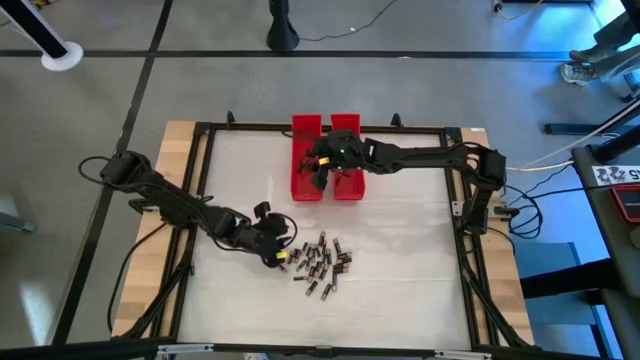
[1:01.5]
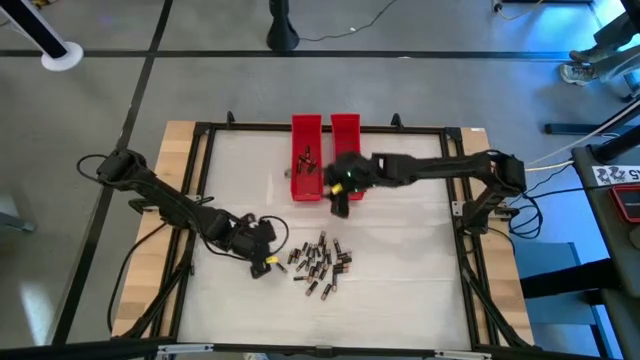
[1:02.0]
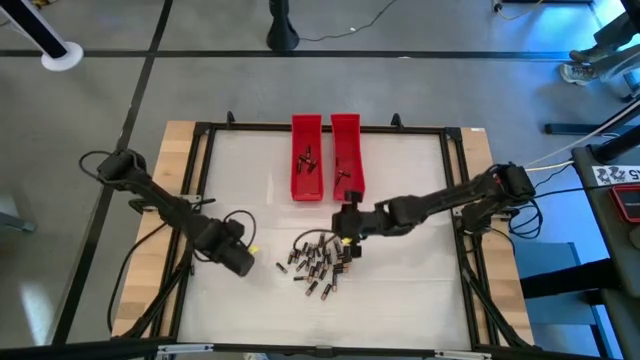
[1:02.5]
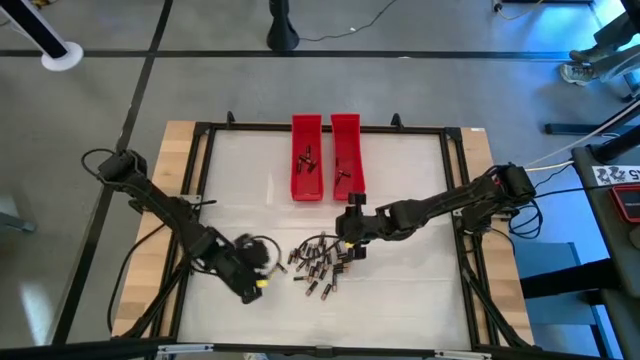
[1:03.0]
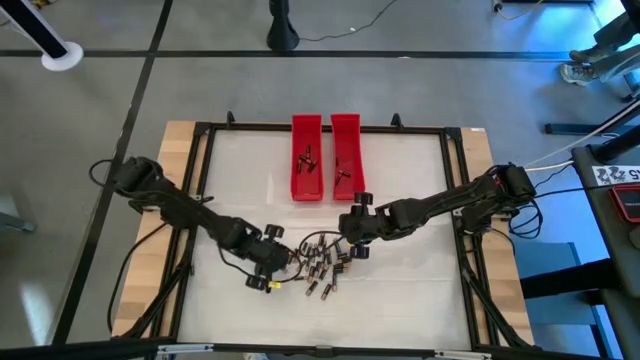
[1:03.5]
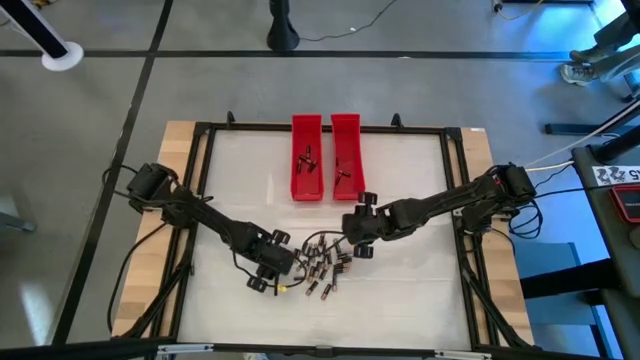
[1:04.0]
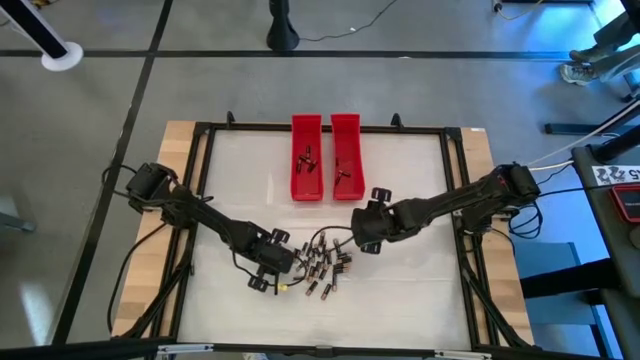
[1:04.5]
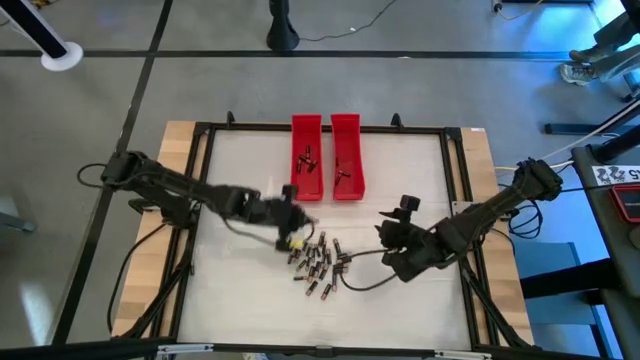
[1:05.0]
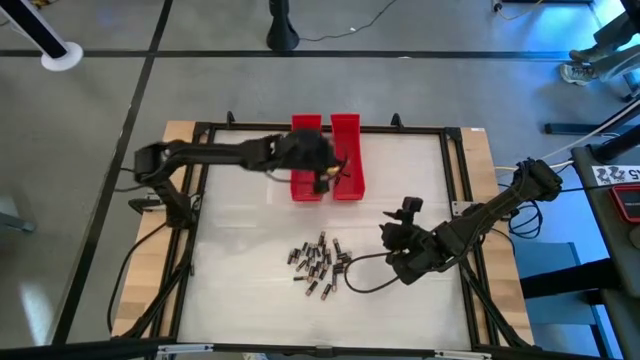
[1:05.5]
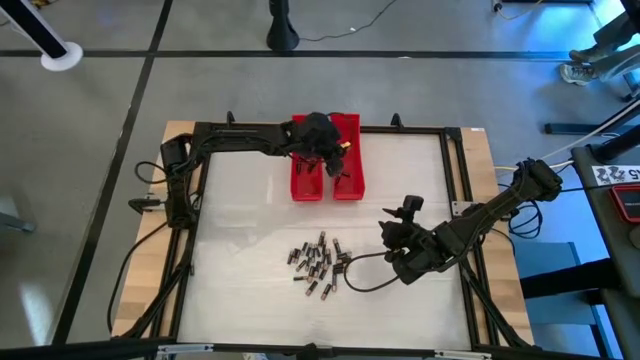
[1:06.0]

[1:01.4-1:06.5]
Task: Sort batteries
Put the small black battery into the right red bin

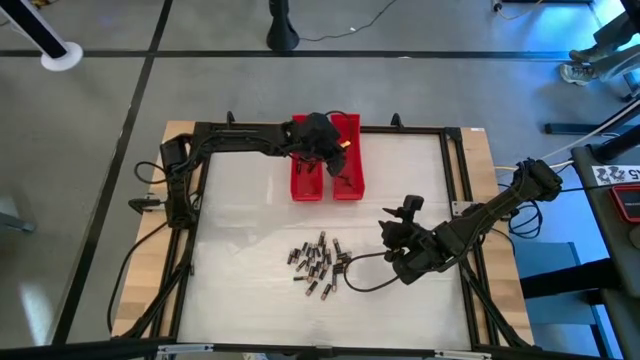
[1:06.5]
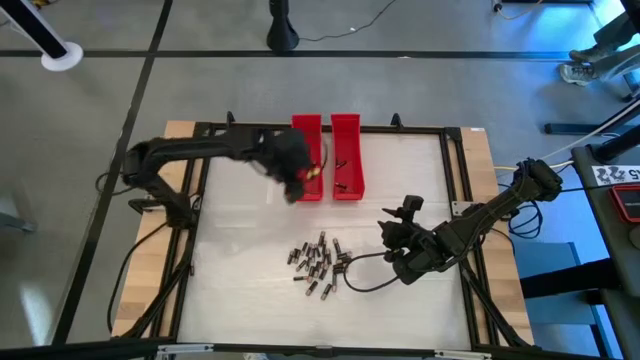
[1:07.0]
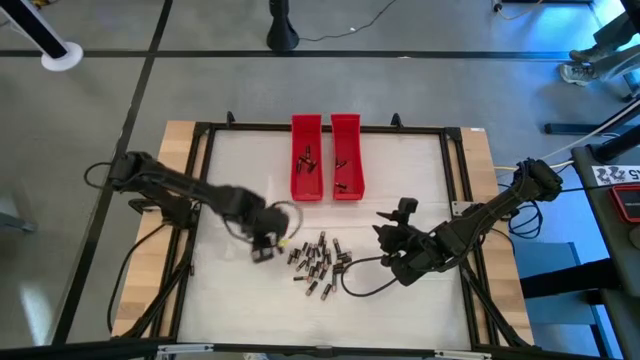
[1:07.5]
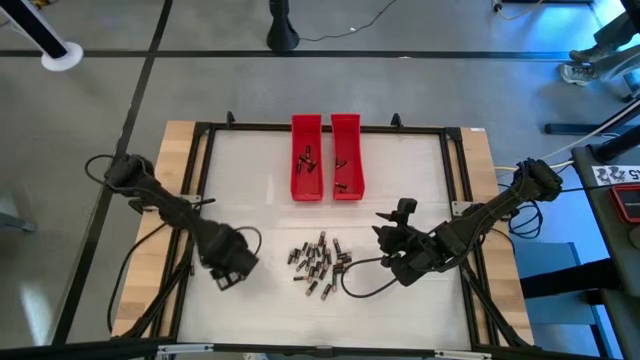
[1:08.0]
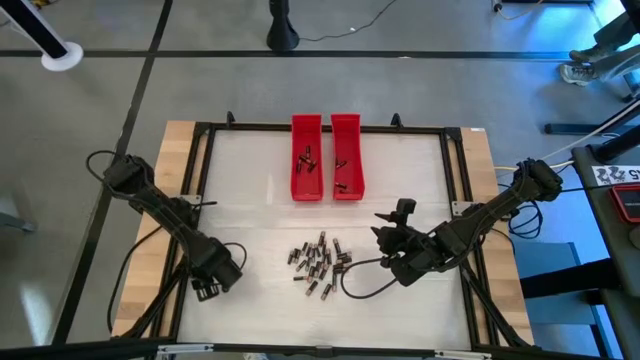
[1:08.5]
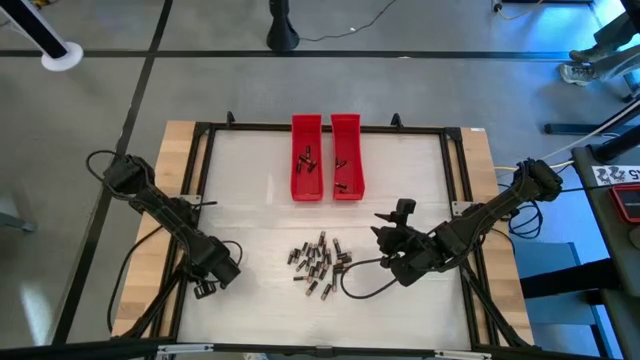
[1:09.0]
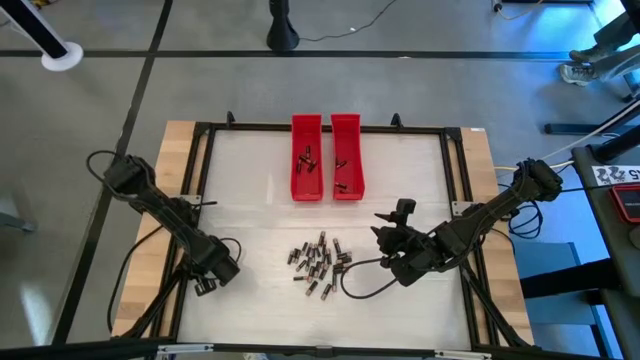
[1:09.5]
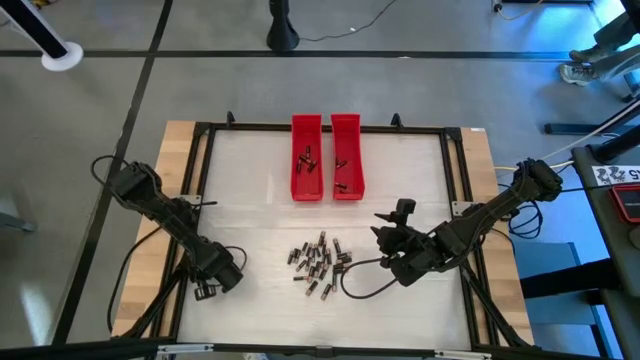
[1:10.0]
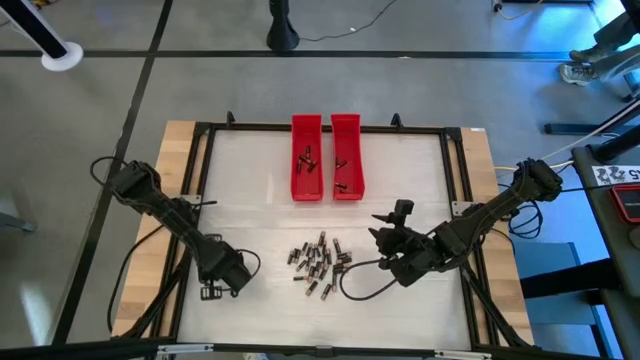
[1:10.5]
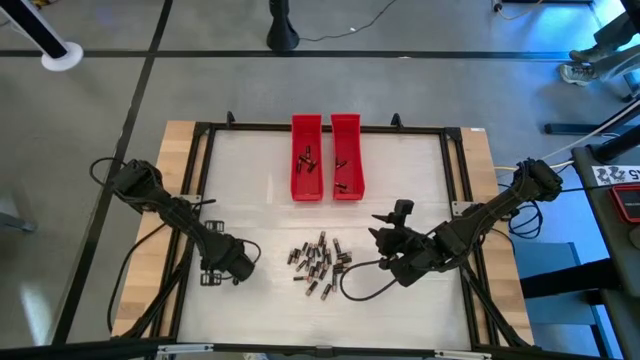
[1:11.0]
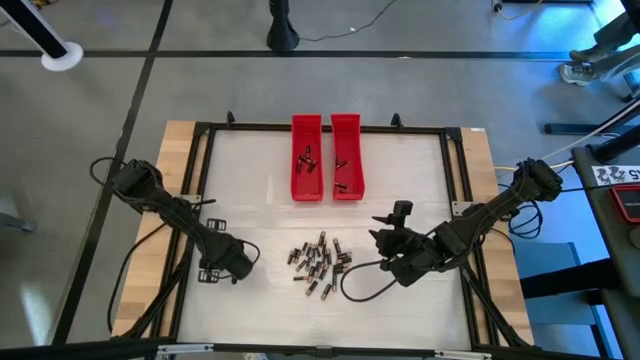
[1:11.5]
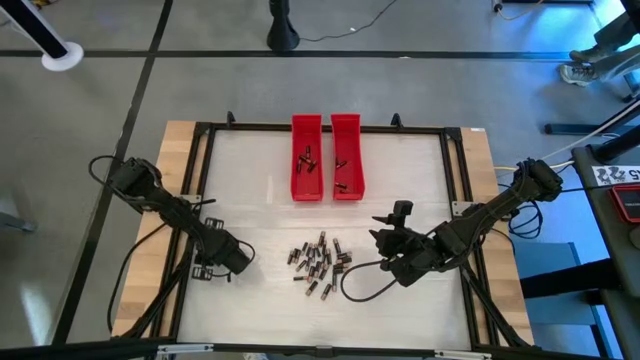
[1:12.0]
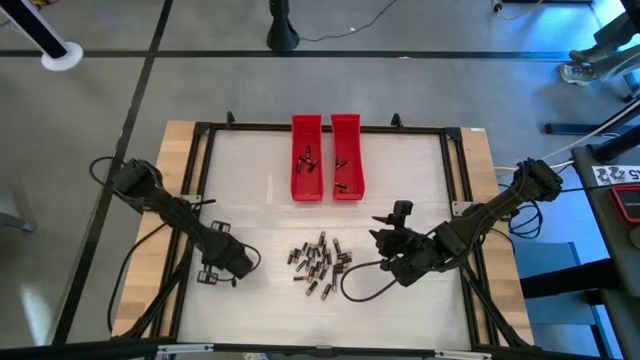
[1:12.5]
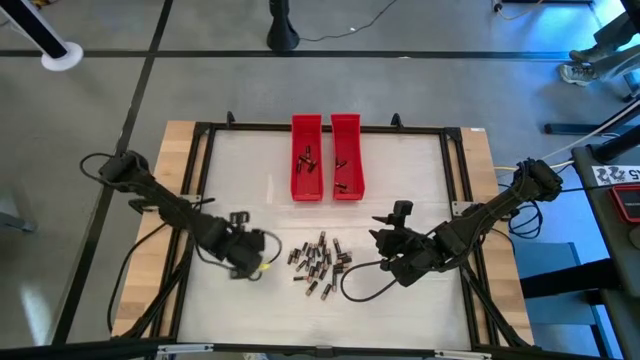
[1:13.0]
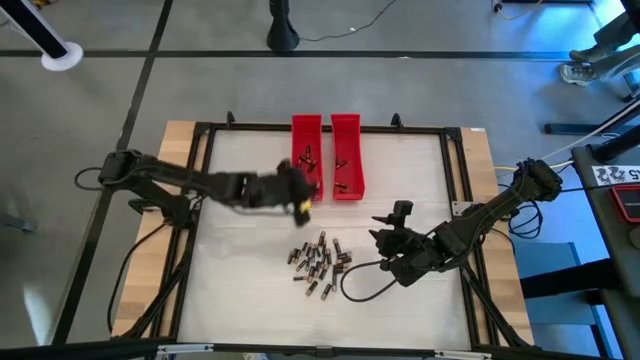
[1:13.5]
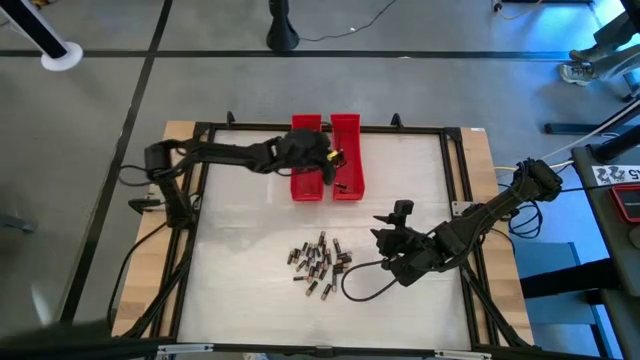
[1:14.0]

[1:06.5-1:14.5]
Put the small black battery into the right red bin

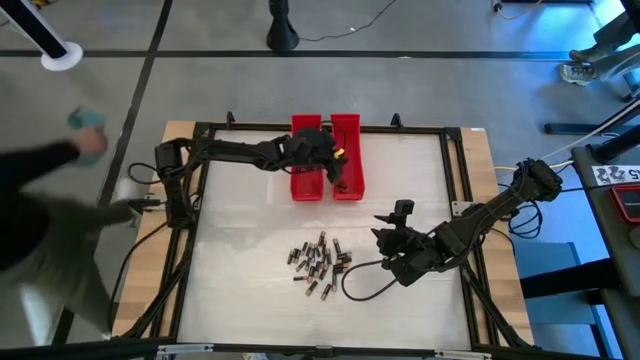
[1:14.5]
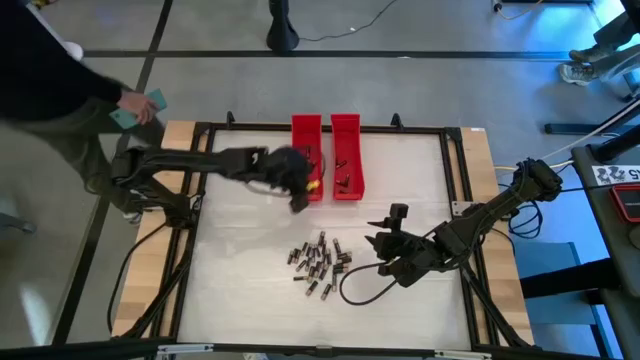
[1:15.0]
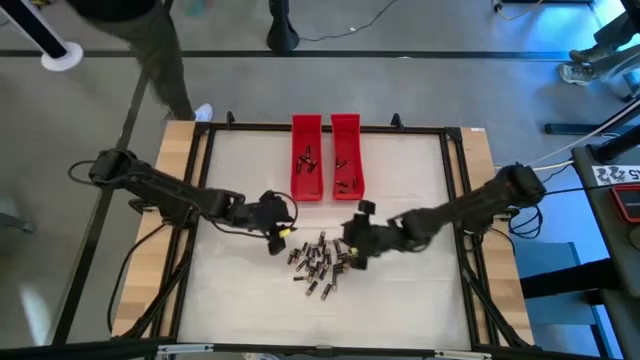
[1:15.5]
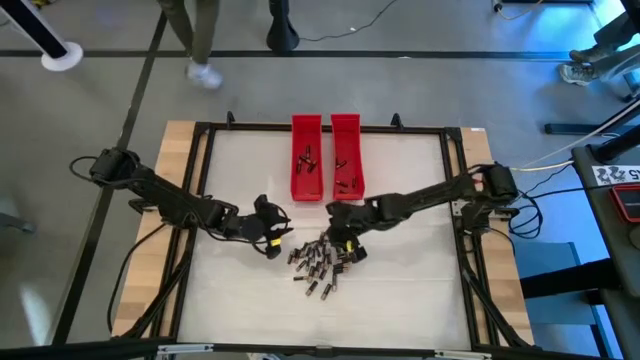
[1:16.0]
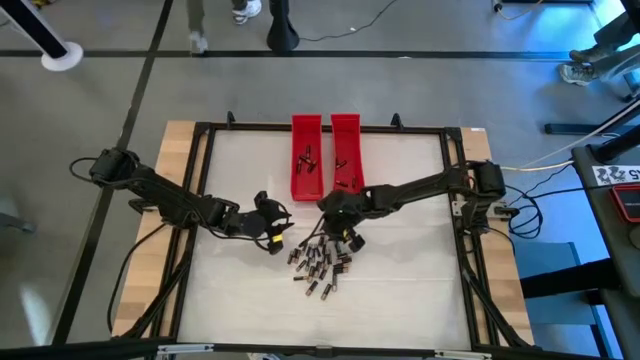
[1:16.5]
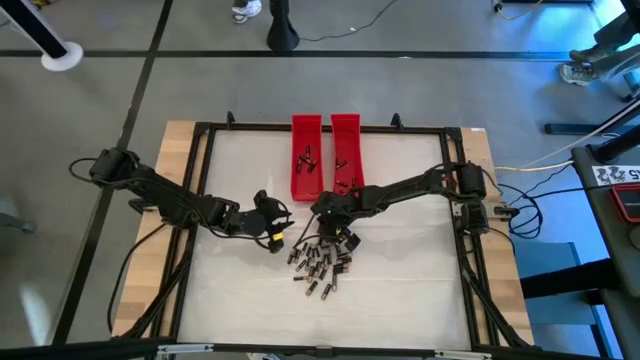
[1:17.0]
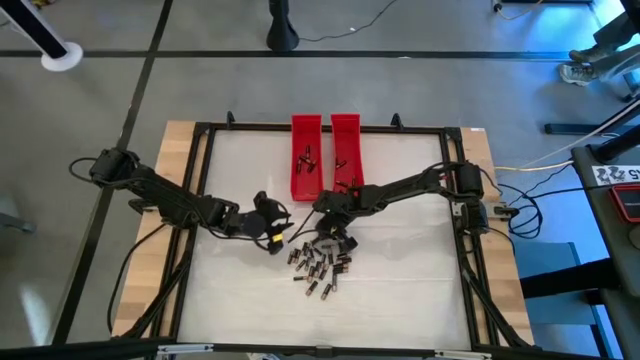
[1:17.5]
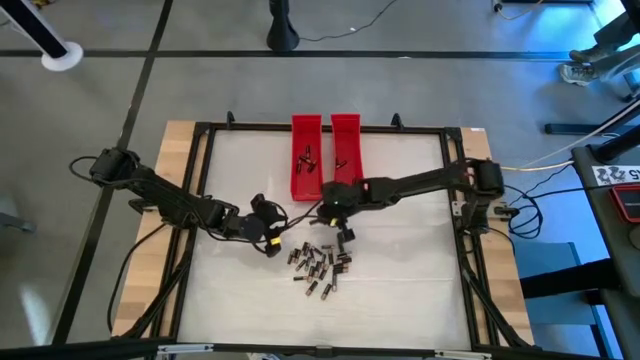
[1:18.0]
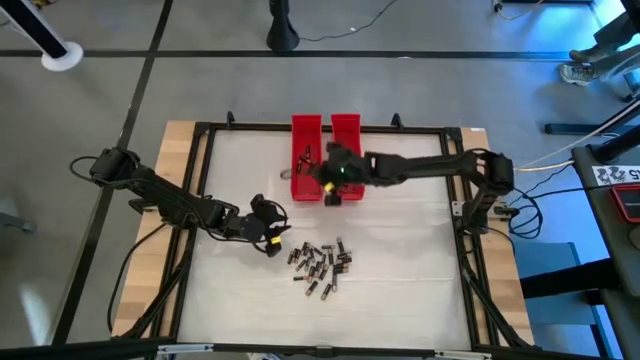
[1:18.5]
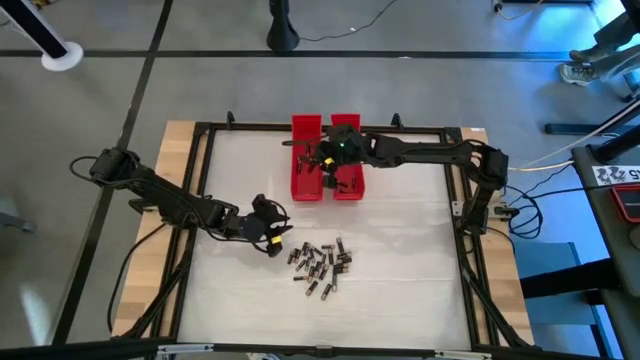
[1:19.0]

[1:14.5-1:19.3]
Put the large black battery into the left red bin

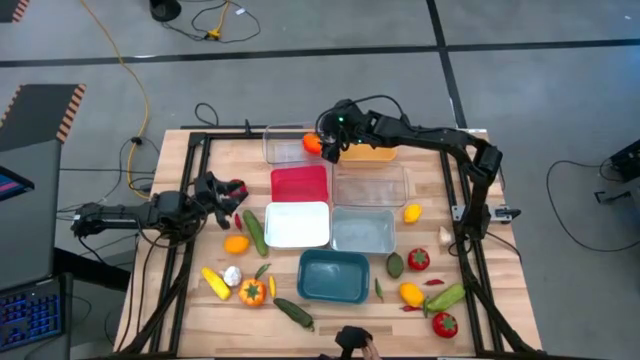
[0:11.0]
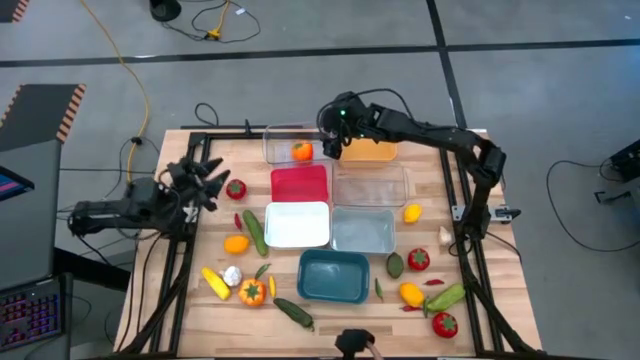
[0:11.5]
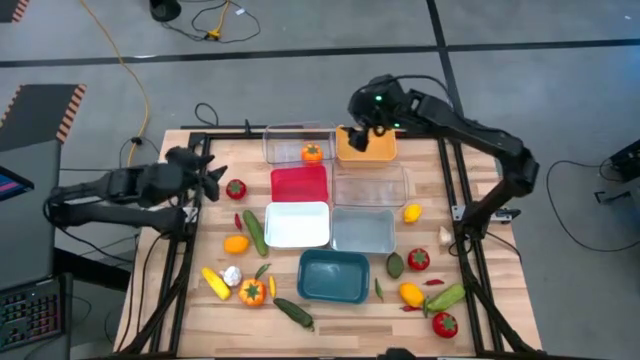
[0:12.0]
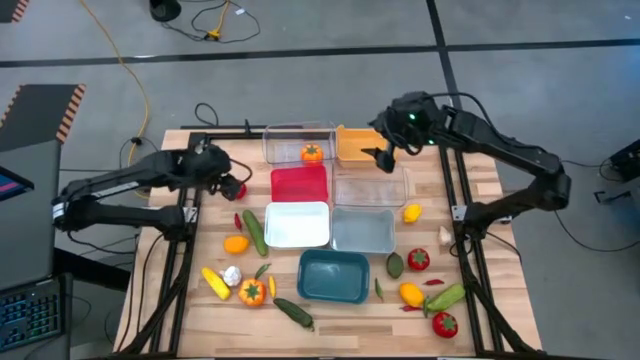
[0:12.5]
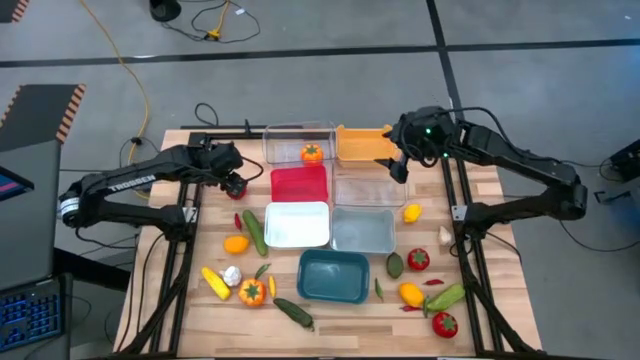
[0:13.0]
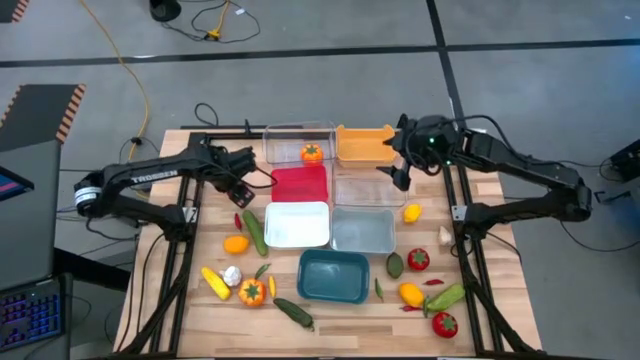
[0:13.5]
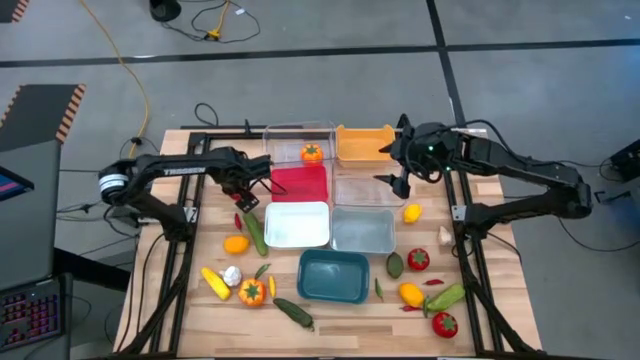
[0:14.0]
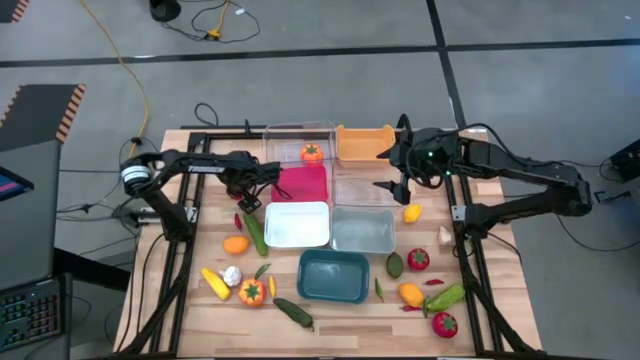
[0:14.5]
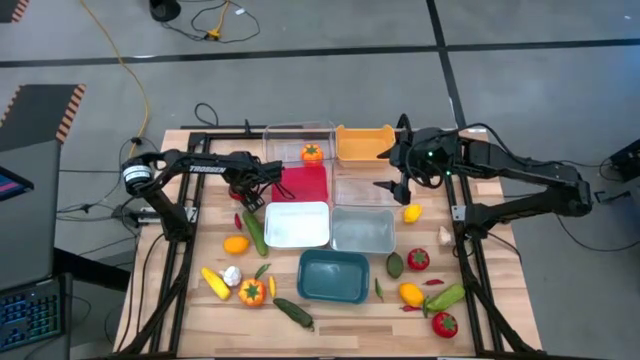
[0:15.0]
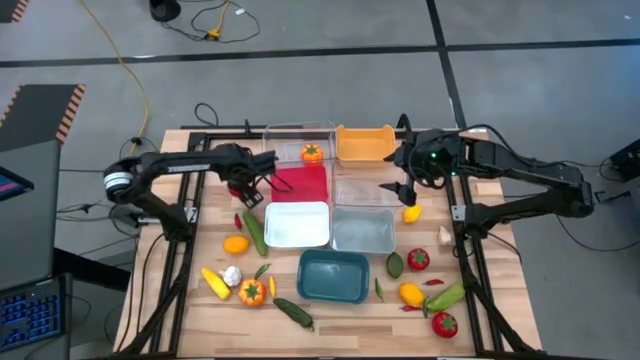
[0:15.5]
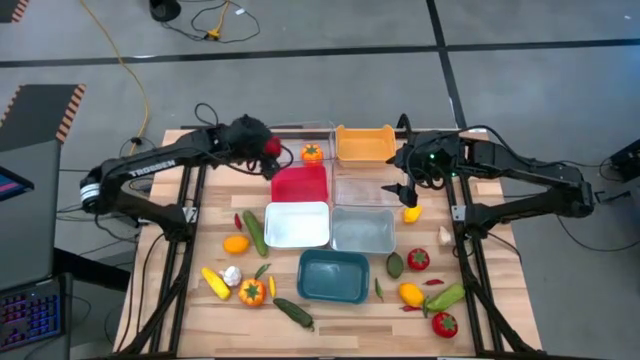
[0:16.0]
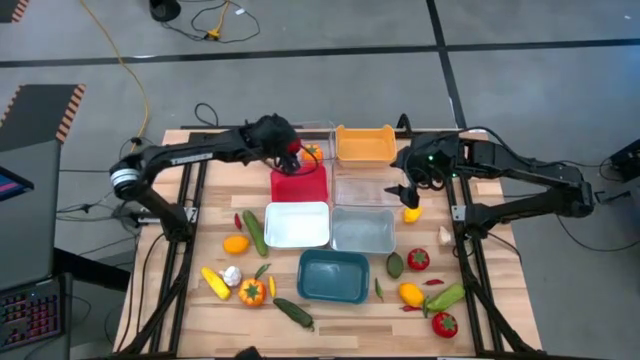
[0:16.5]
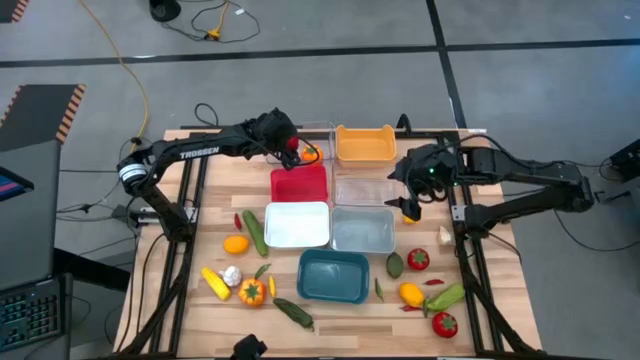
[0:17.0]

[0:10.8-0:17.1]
Task: Sort produce into baskets
Put the top left red tomato into the top transparent bin
